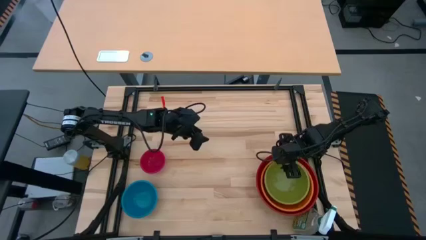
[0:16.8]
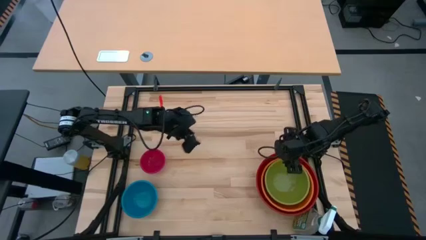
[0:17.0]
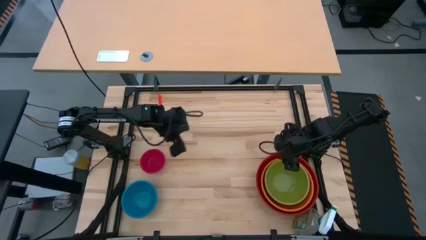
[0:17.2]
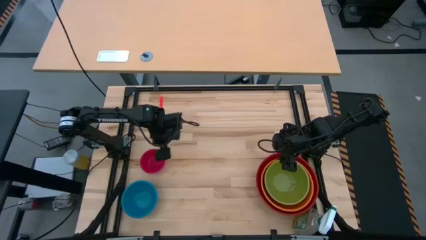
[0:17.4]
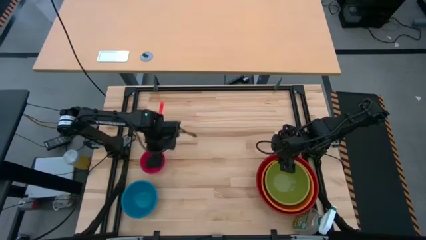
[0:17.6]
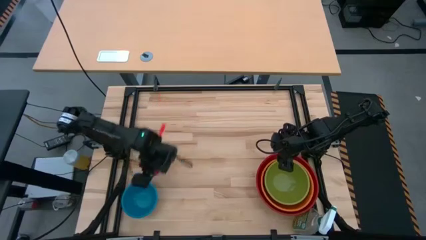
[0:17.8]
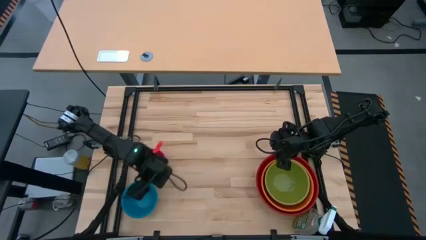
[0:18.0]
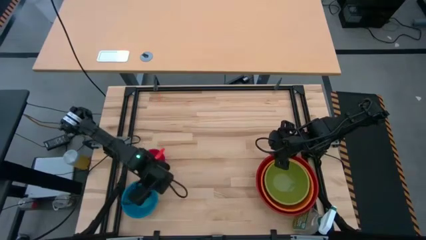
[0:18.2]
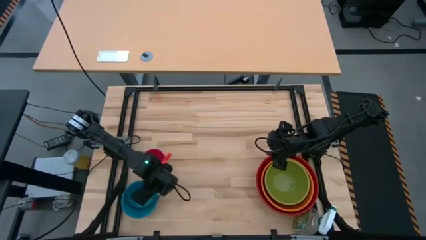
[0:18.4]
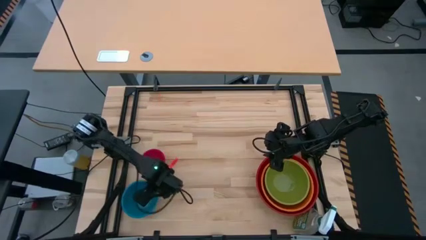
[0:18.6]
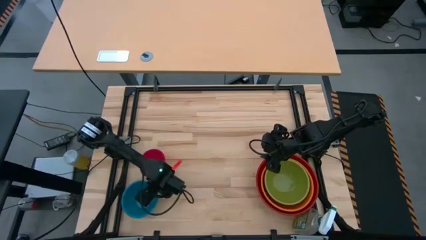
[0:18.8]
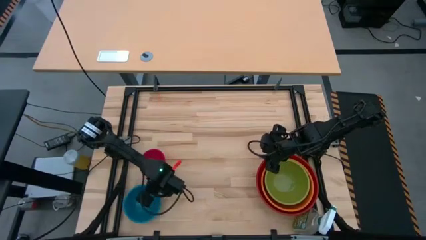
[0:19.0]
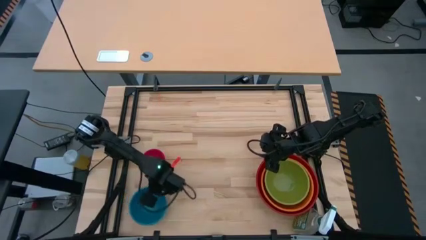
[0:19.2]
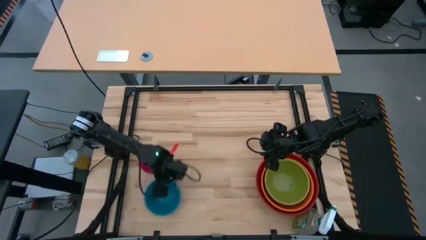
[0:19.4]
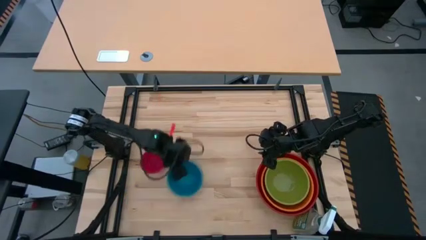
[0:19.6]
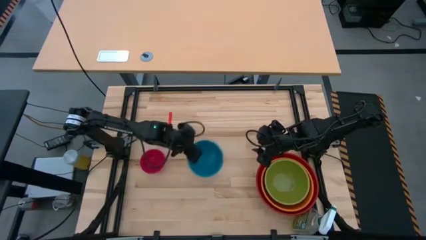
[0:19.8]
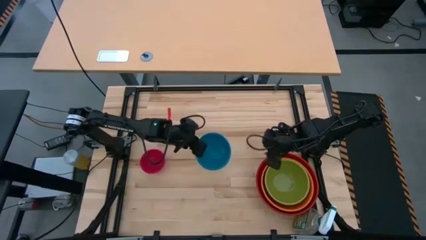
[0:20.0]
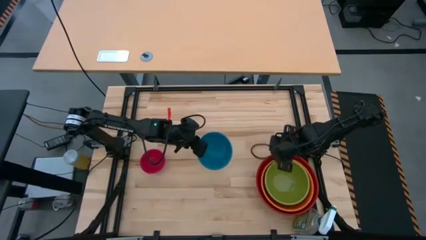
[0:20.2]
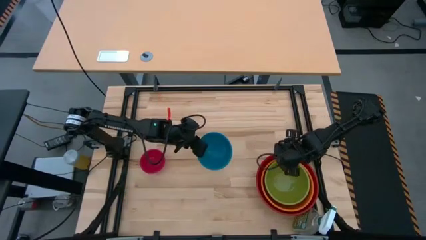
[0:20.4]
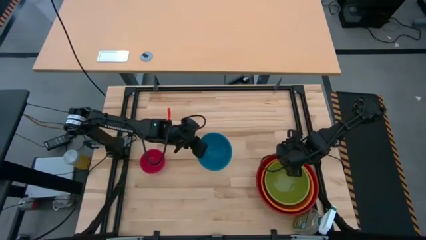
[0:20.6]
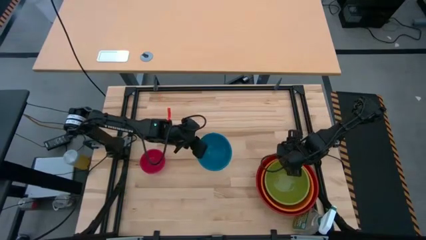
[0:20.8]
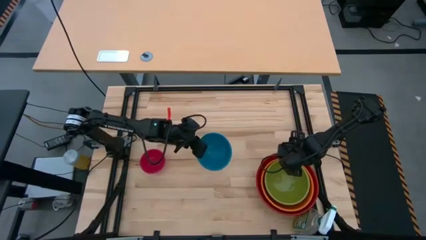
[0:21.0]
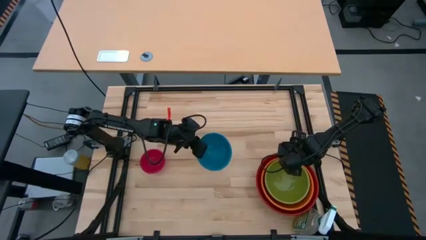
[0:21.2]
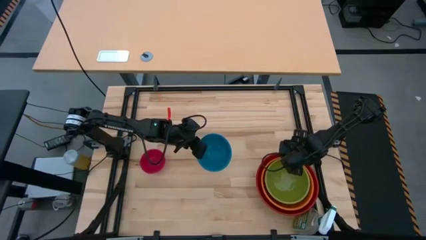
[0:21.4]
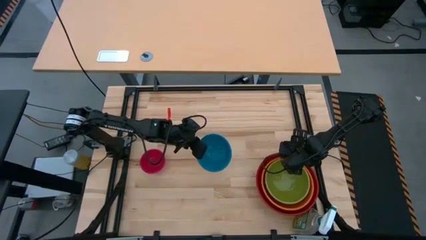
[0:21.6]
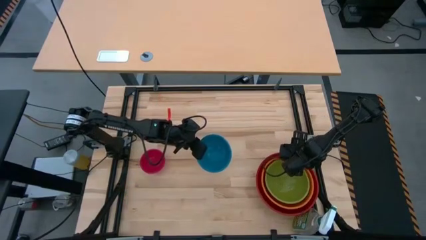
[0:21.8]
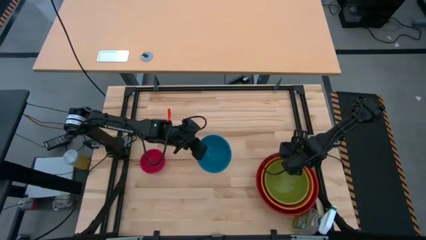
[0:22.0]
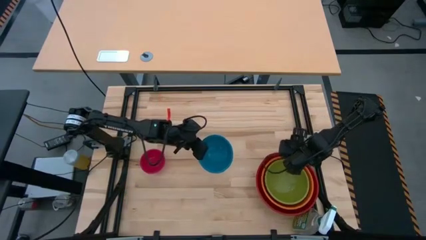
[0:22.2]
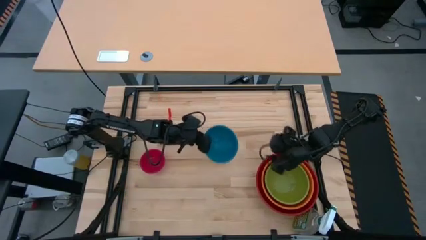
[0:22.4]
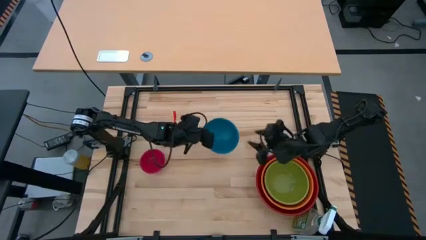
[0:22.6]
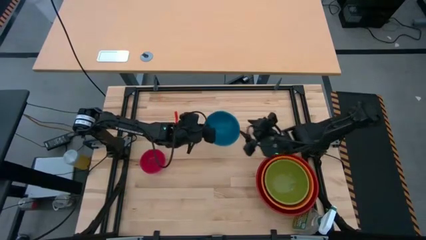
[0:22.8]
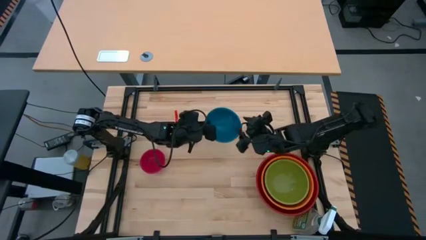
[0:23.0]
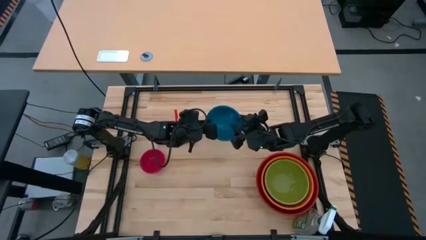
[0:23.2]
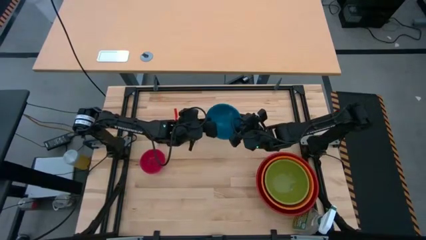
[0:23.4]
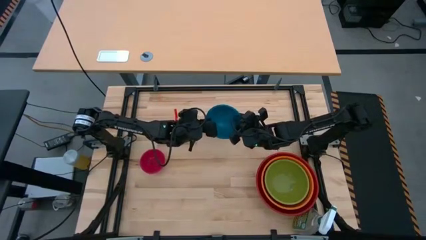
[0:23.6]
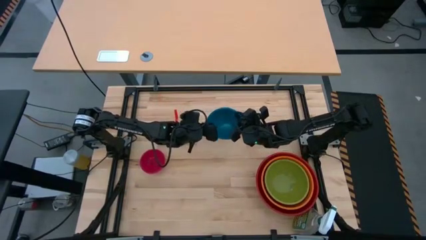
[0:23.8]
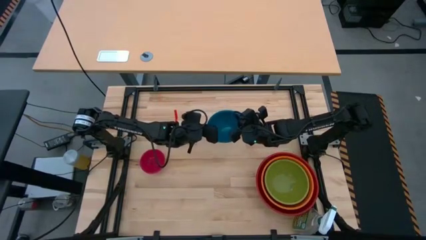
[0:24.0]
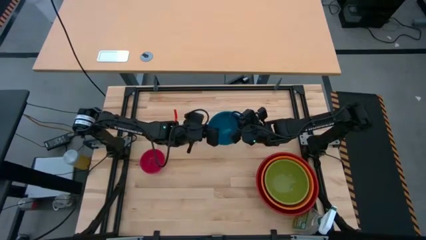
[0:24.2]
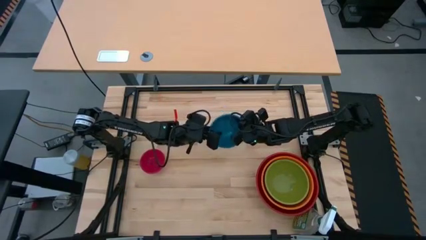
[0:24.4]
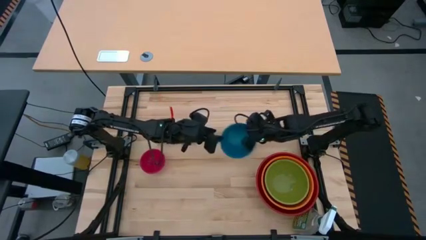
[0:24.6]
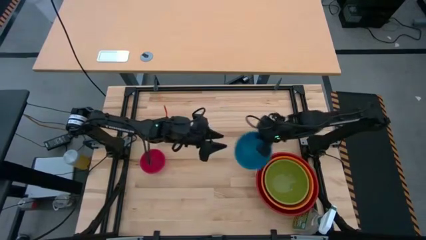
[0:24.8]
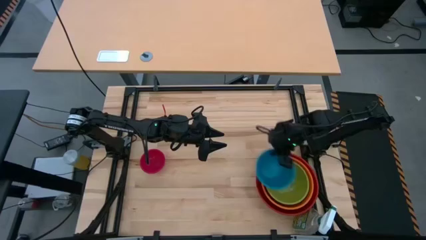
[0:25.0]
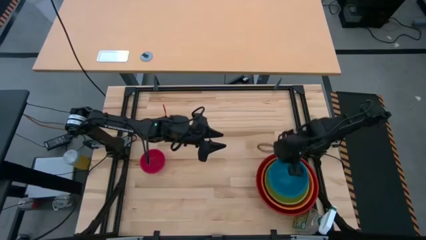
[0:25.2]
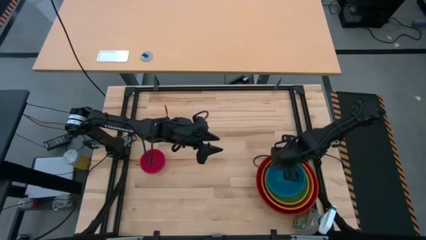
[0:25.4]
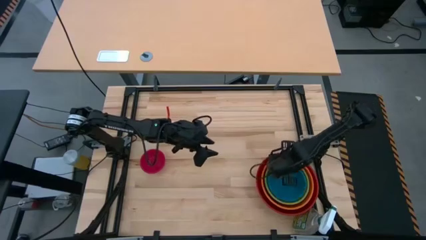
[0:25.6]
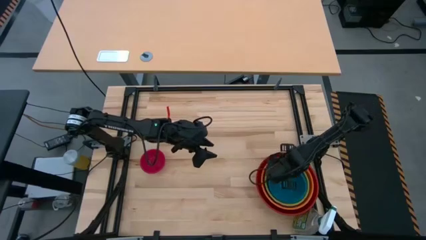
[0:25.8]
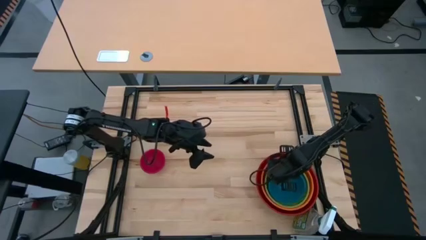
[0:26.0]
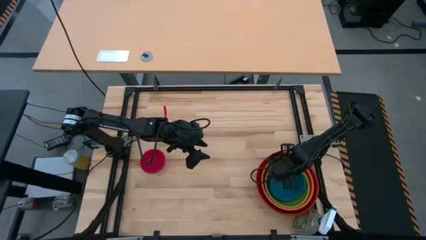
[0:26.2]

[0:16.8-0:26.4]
Stack the blue bowl on top of the green bowl

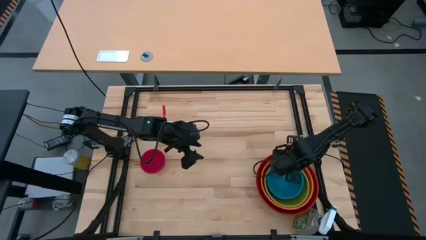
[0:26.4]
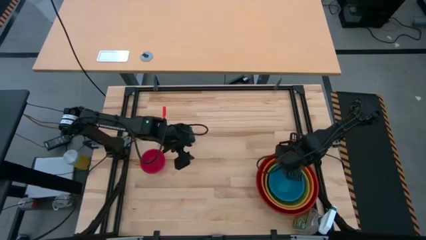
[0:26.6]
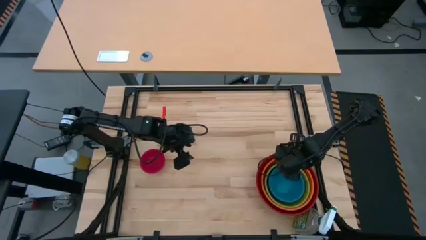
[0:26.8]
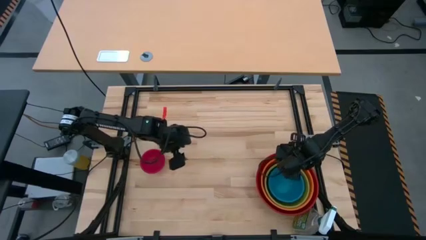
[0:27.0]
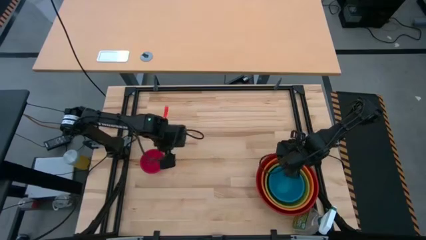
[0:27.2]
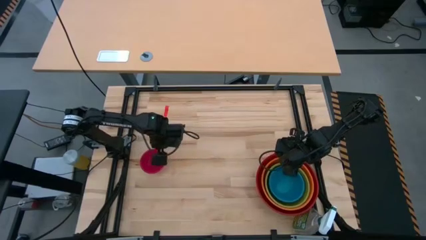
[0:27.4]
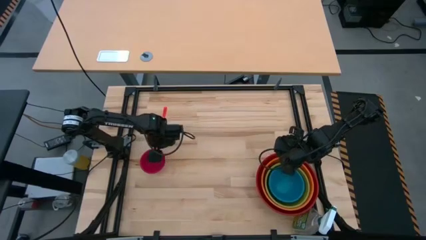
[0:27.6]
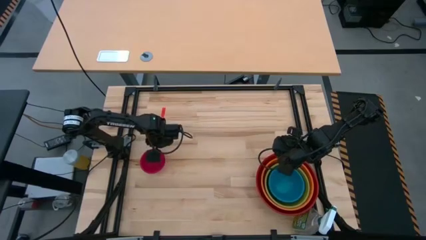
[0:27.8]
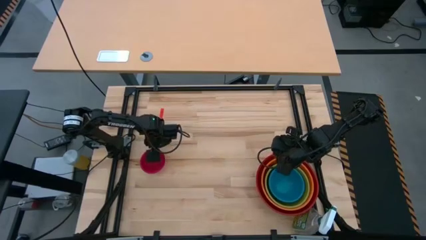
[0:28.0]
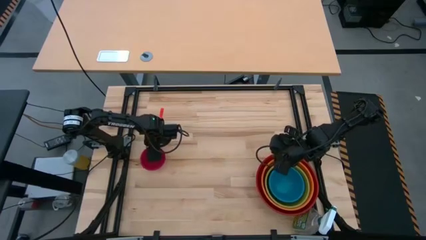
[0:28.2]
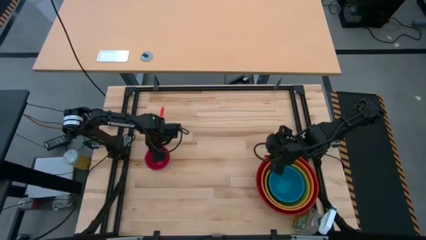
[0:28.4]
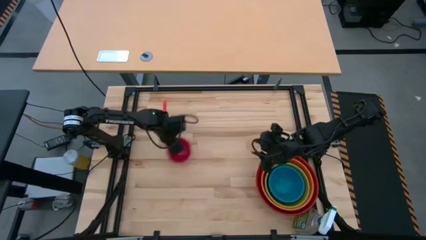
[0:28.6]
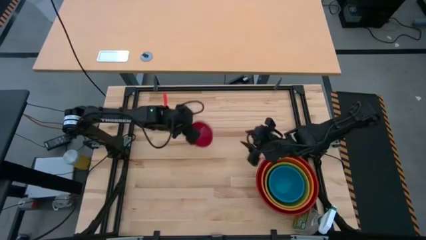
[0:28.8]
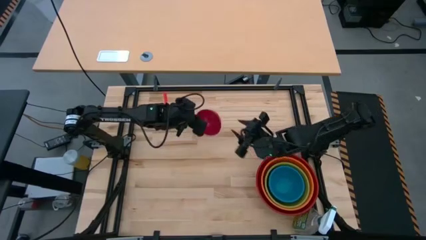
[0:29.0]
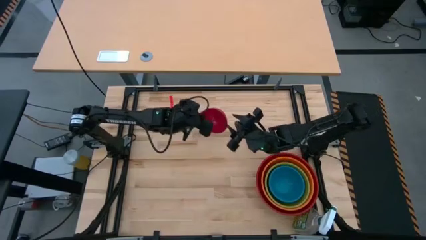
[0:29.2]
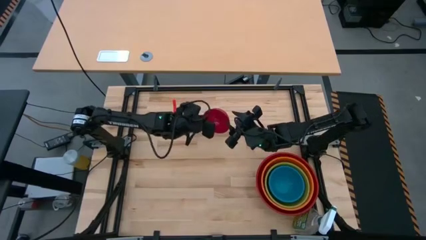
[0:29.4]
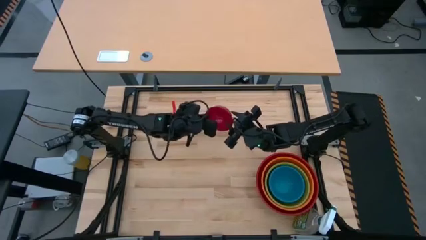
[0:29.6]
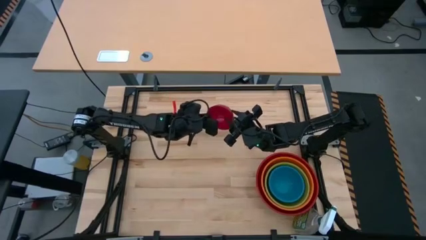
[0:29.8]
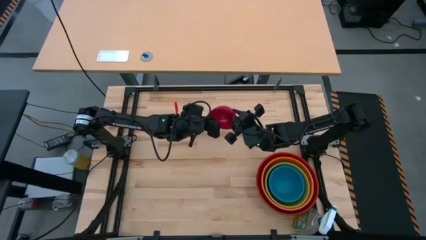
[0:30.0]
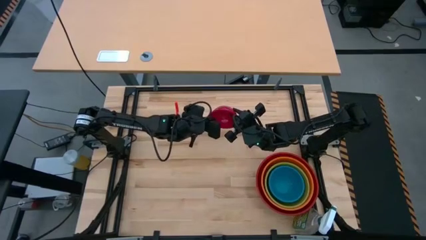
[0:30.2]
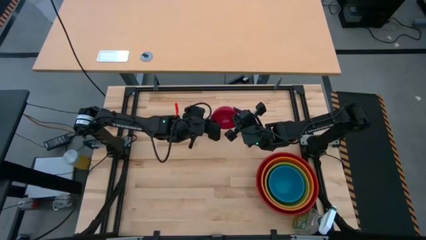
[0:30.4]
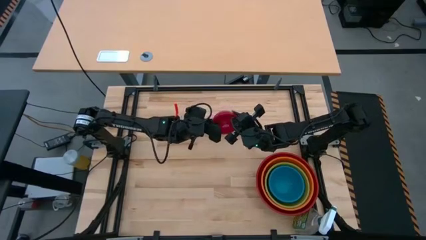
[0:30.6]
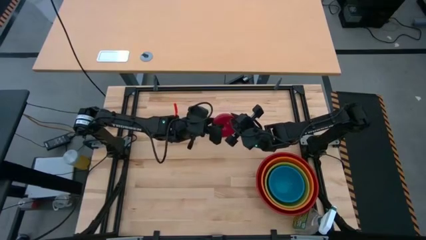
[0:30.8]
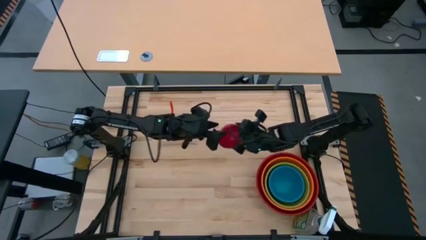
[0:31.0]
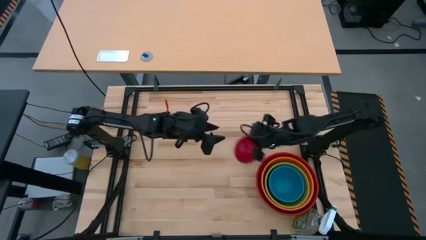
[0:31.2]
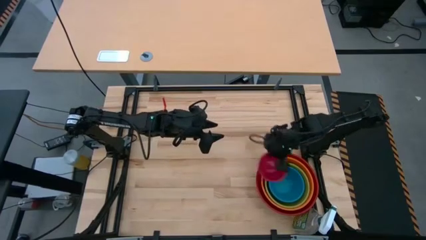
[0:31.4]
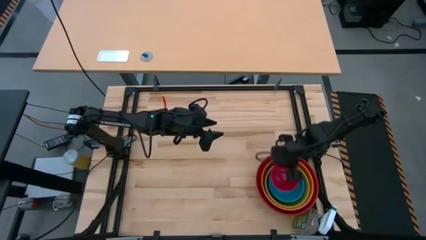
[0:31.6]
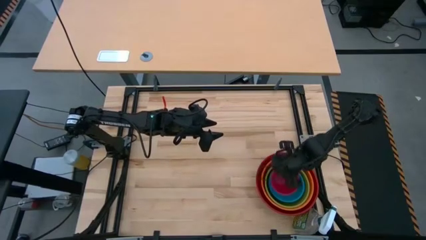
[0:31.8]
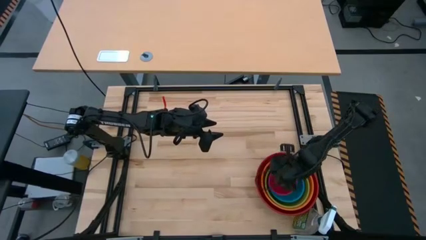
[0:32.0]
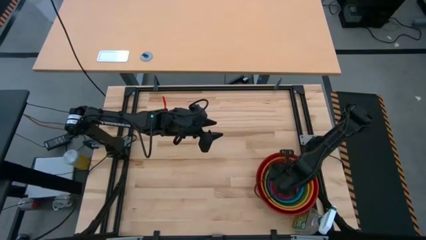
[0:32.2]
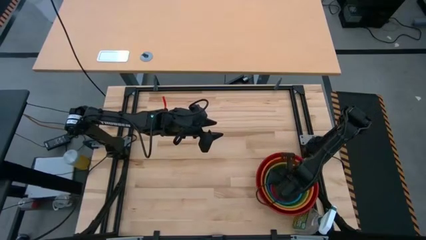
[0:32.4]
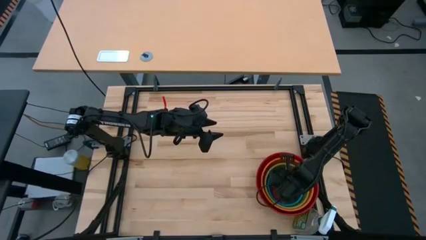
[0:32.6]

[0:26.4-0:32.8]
Stack the pink bowl on top of the blue bowl
